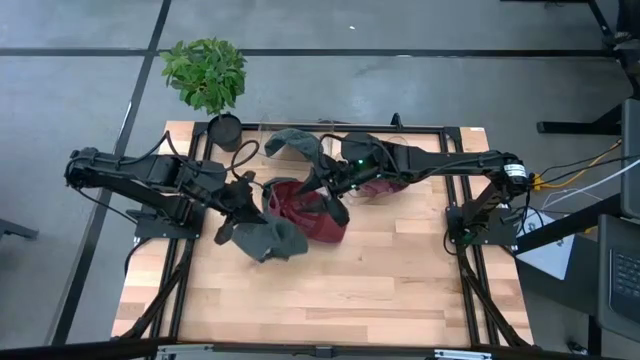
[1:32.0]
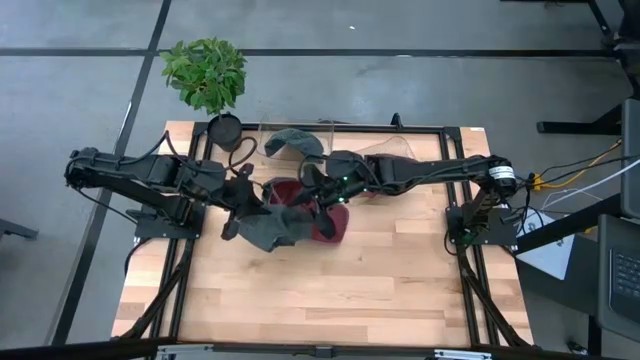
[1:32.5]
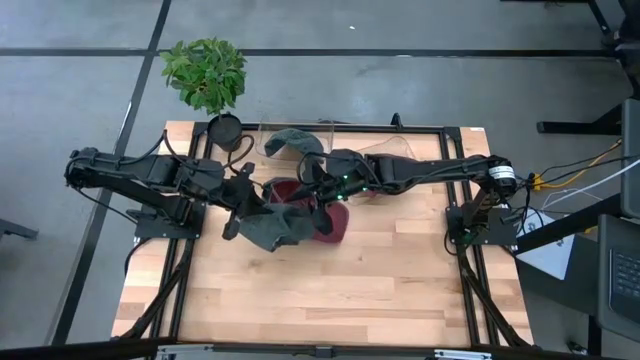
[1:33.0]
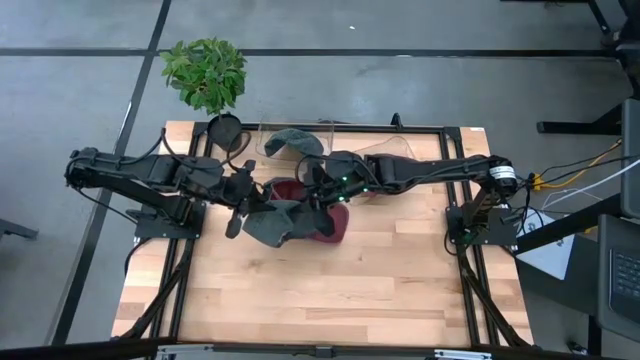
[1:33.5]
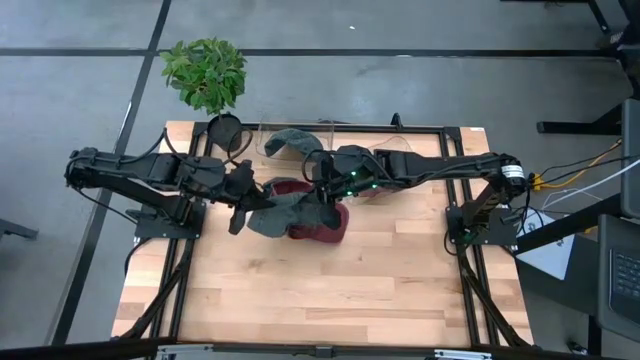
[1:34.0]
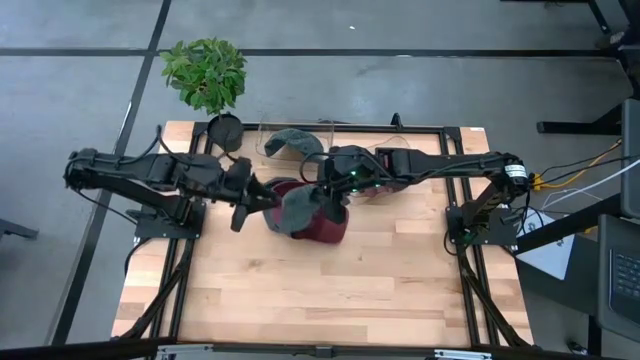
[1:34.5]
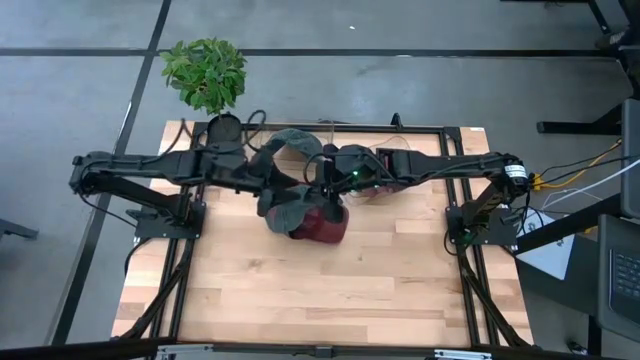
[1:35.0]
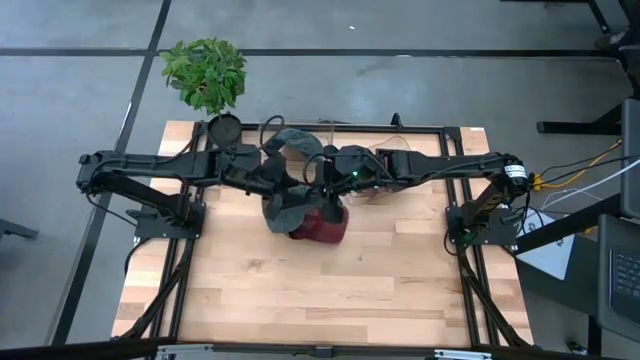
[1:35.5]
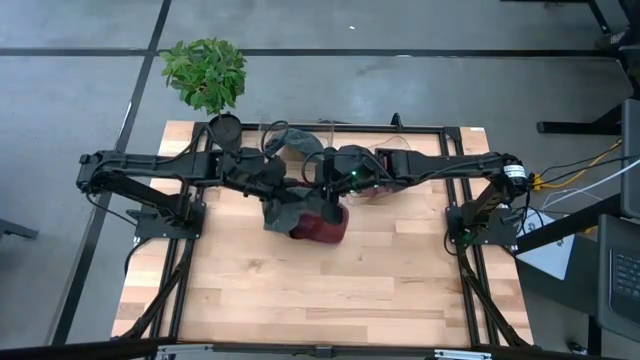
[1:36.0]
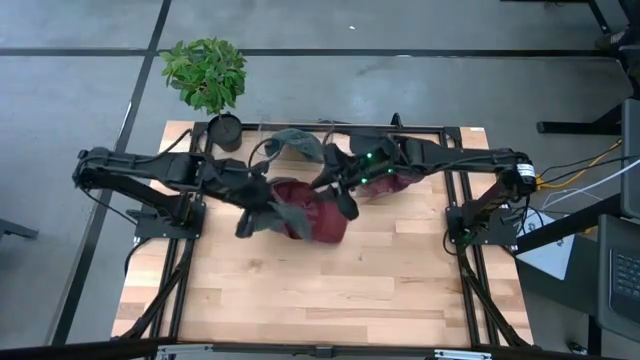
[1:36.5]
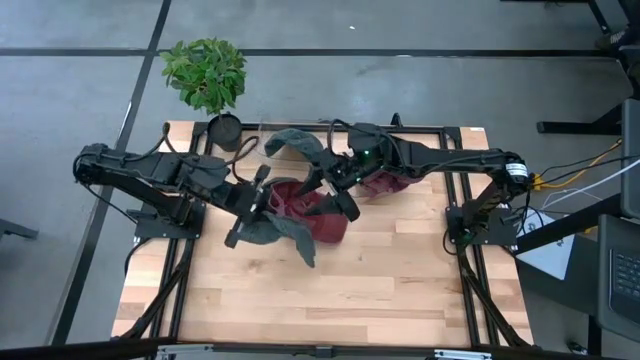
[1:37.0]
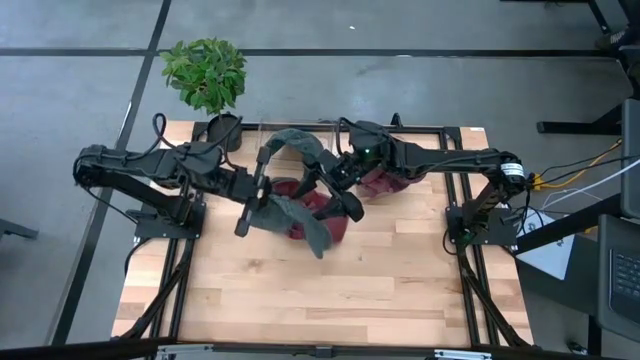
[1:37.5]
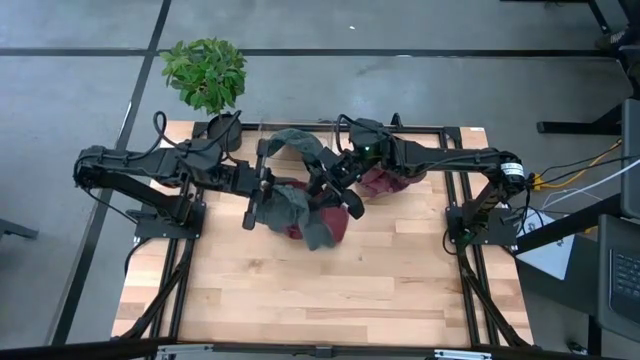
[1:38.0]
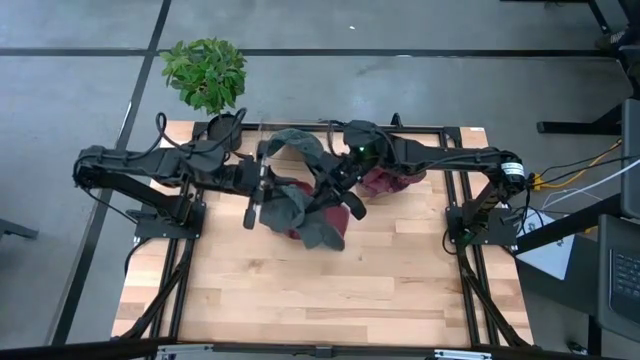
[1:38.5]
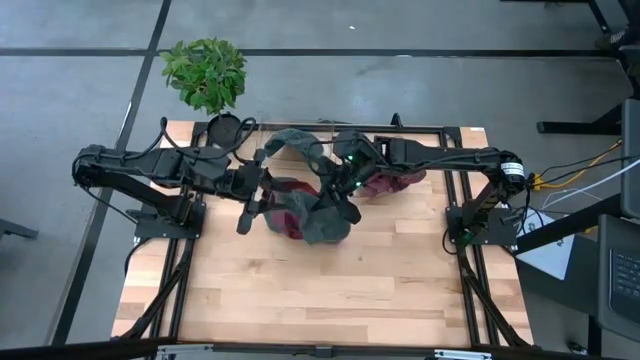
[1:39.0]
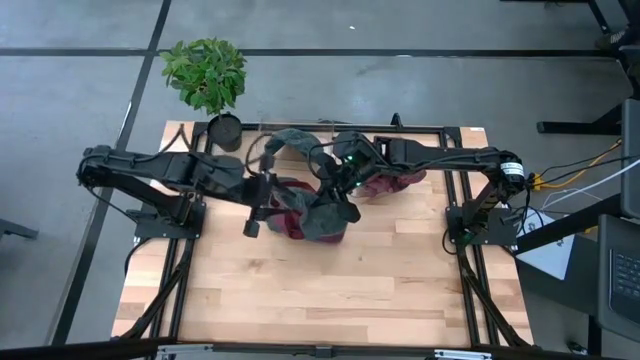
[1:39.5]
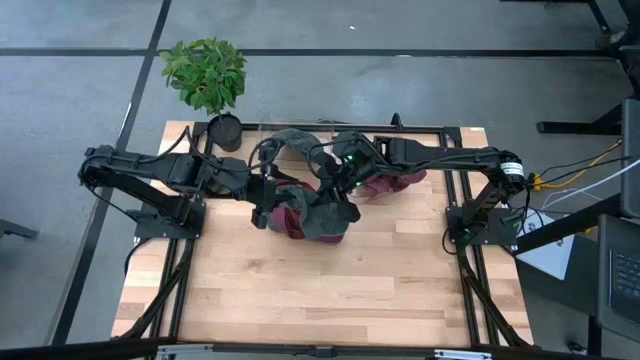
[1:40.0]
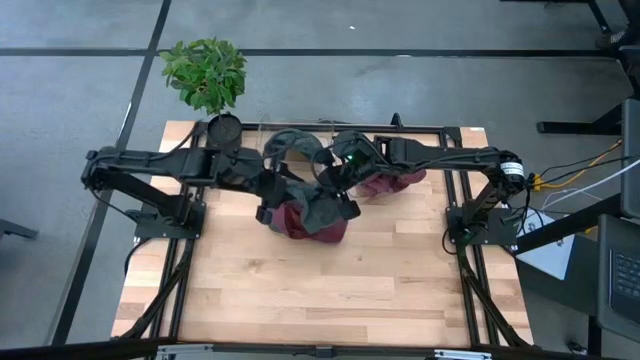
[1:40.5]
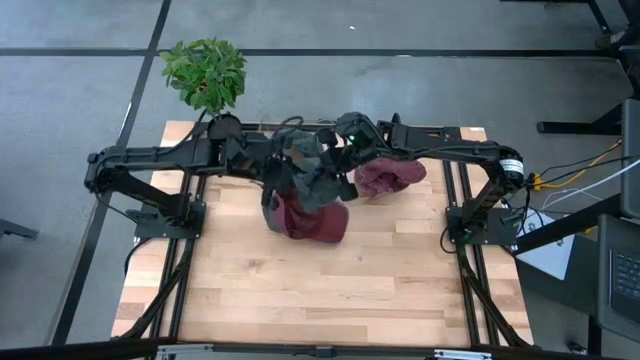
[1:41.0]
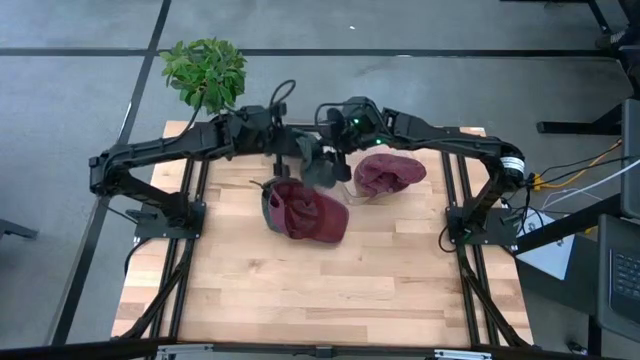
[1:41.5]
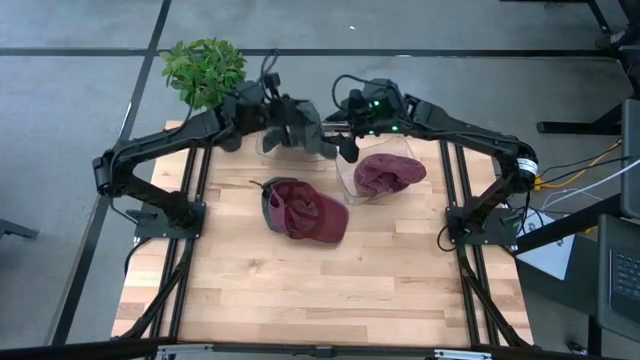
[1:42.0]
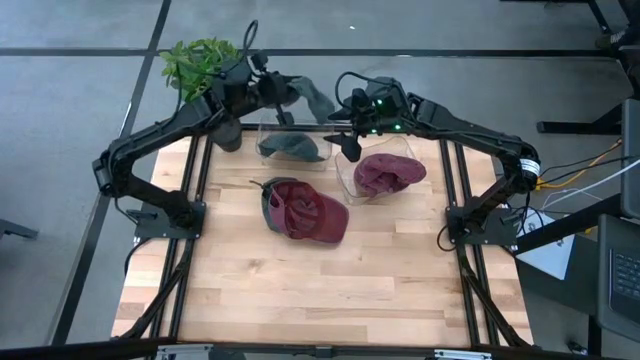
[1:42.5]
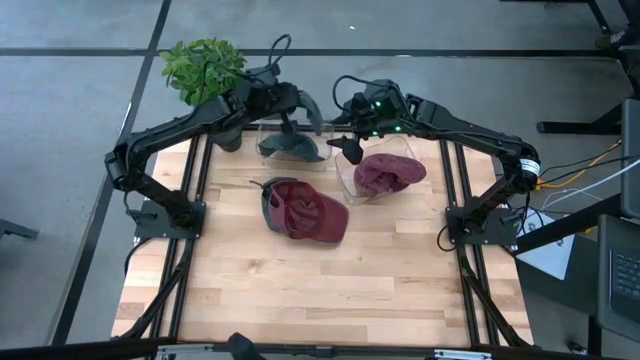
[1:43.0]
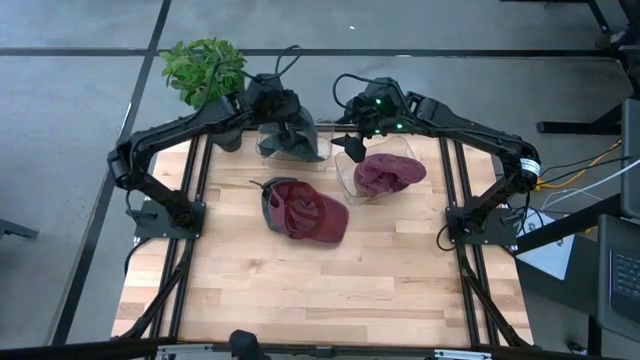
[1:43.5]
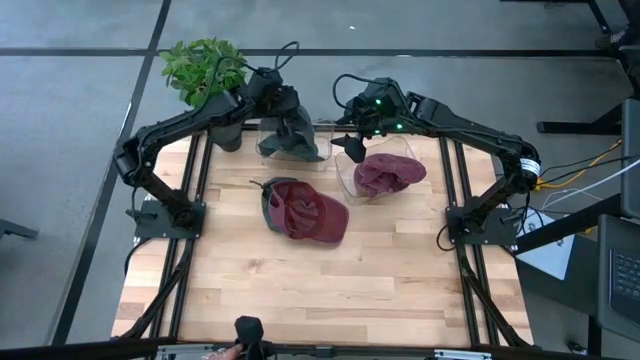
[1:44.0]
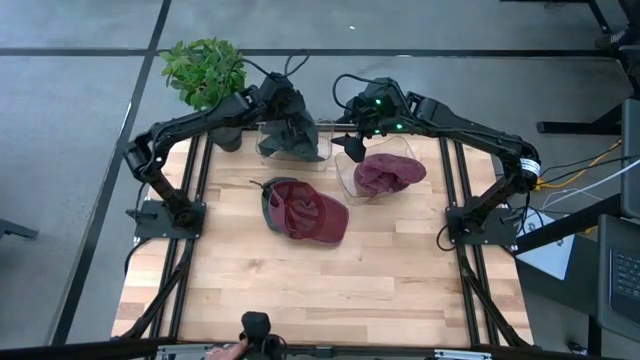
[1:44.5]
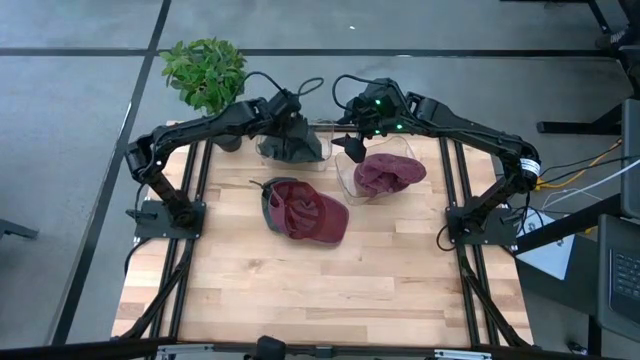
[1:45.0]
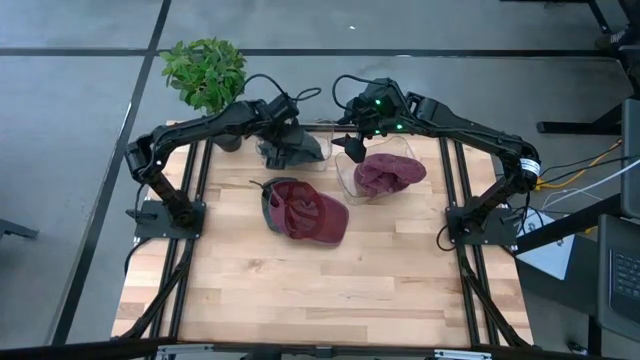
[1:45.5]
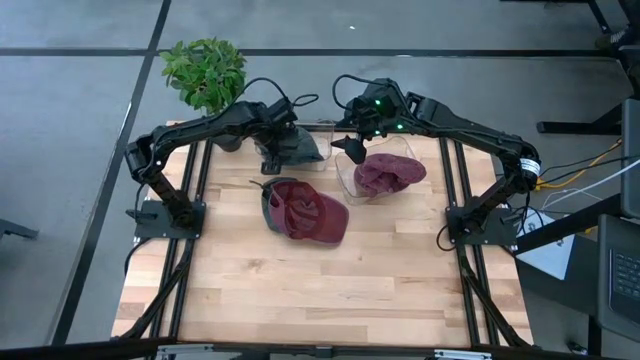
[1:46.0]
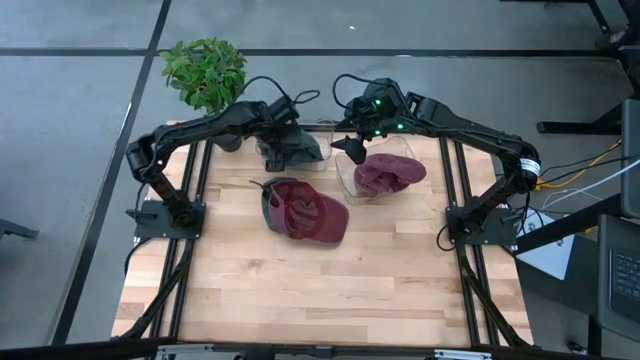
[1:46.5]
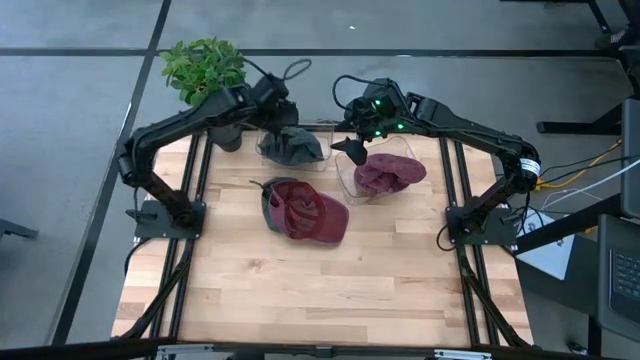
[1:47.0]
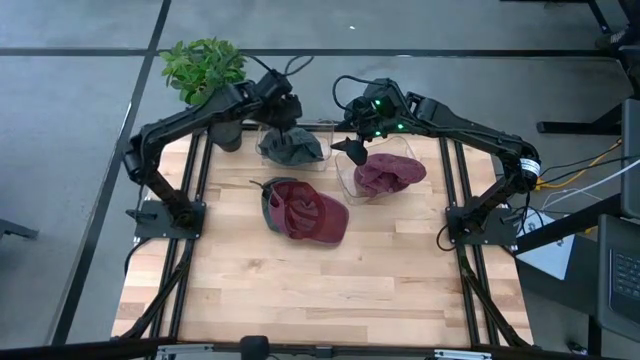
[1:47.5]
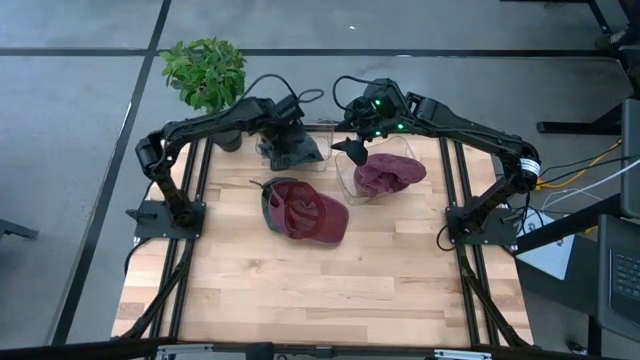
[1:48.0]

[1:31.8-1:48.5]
Task: Pick & Place hat
Put the bottom black cap into the left transparent bin

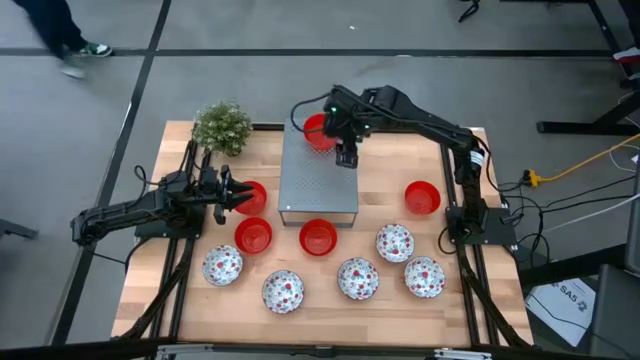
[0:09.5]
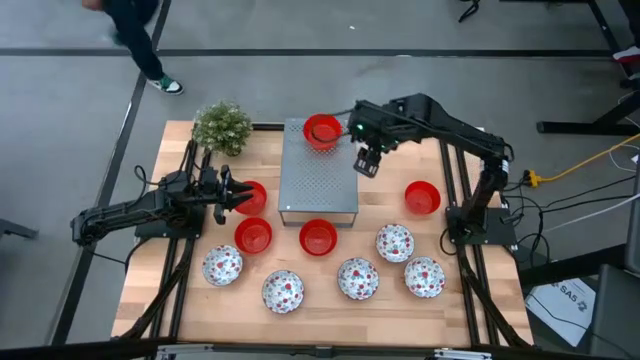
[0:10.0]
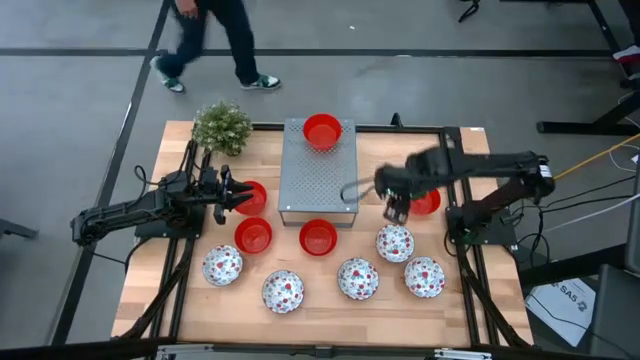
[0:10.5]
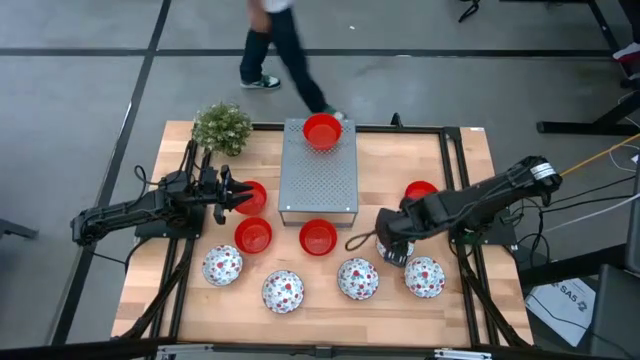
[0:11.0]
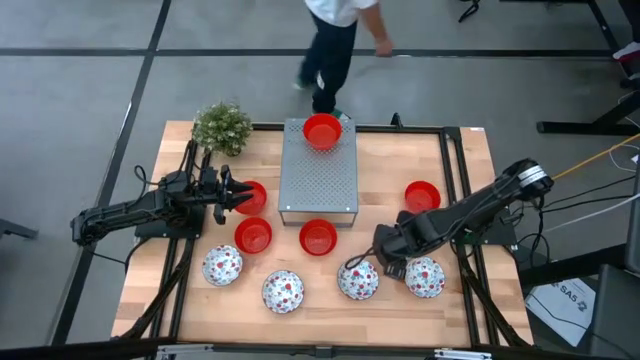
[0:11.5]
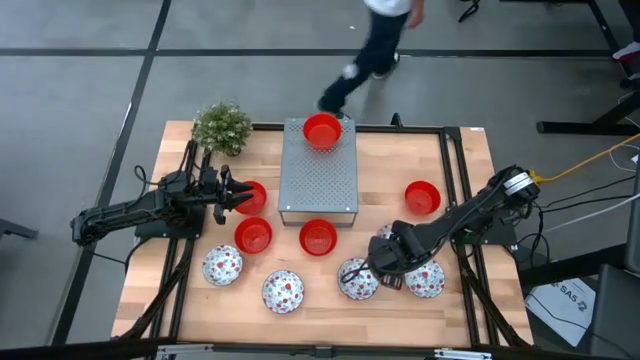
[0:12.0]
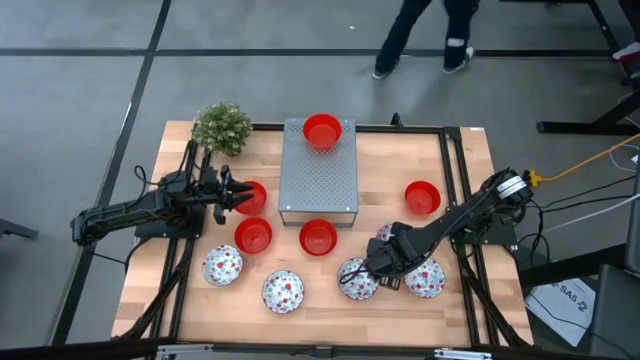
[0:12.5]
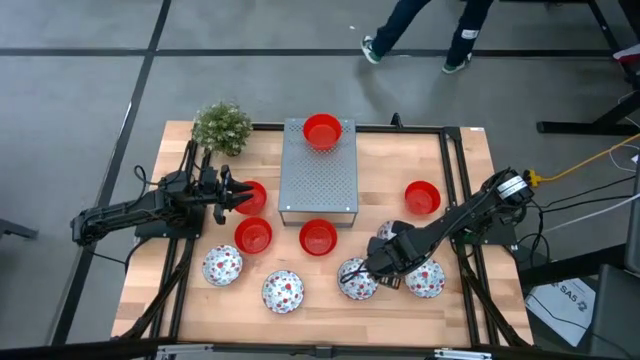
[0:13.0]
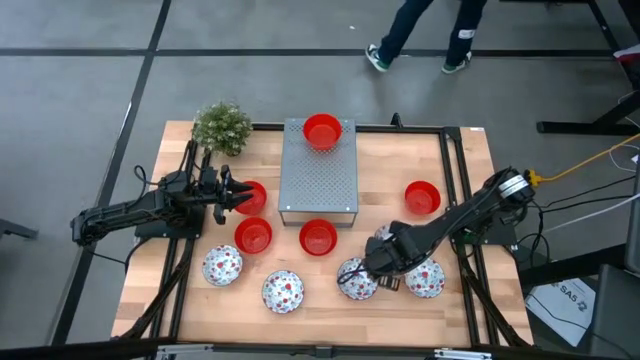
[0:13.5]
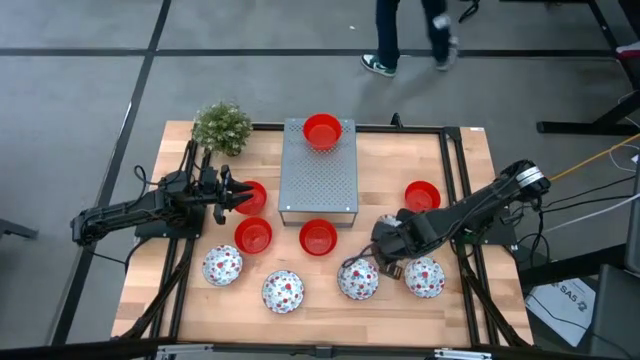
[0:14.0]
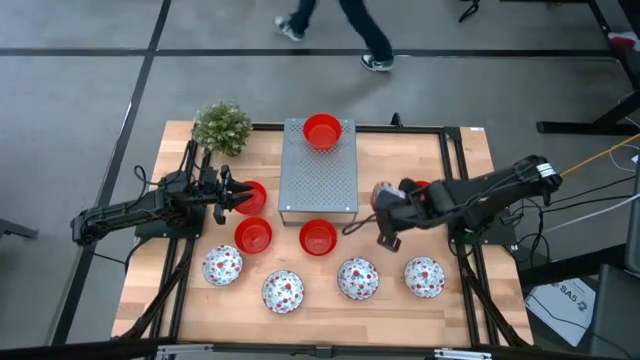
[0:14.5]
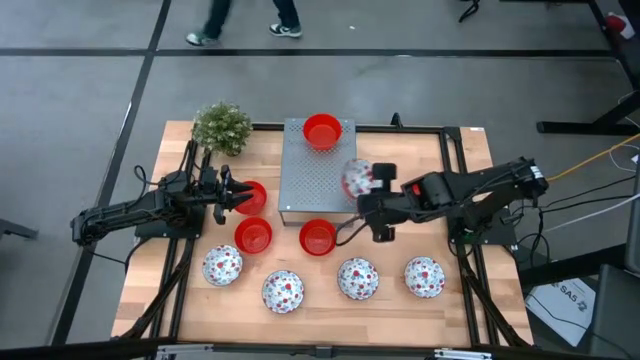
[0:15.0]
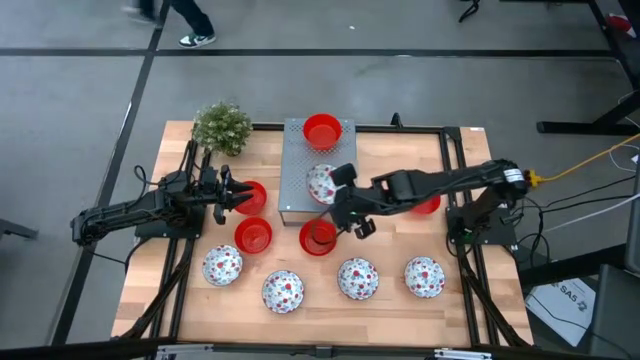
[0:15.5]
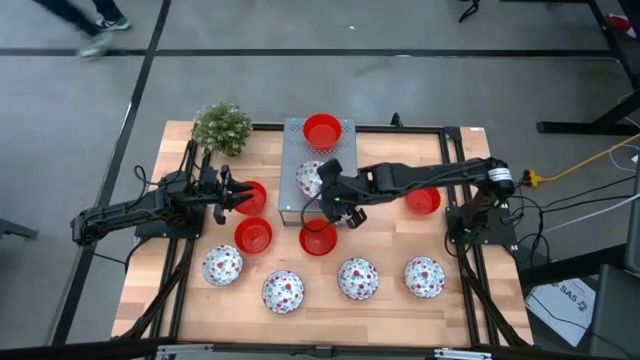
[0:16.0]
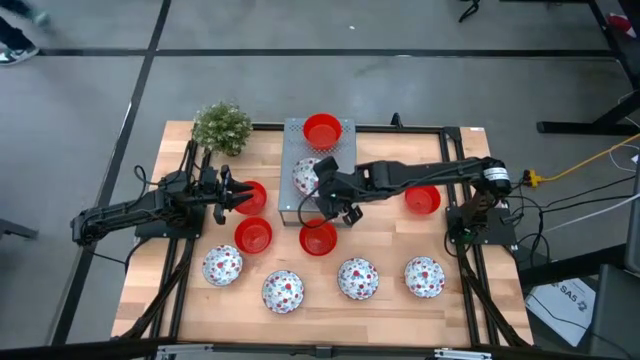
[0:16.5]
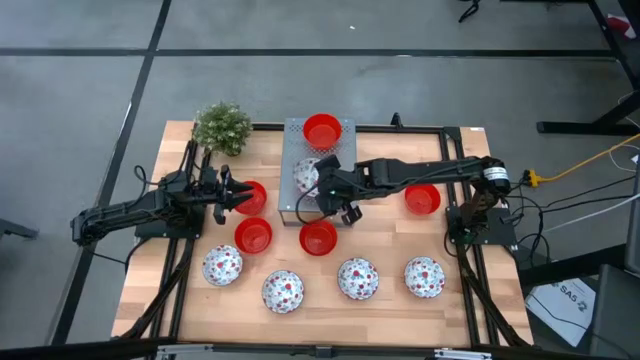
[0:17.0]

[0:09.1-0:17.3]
Task: Pick & Place Mini bowls
Put the white patterned bowl on the shelf
